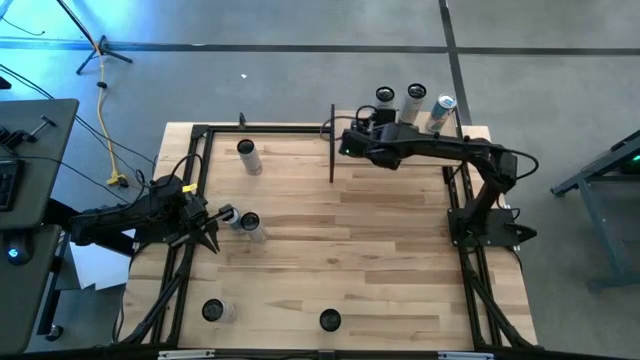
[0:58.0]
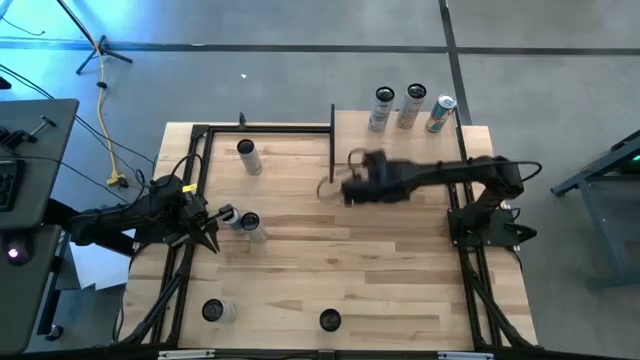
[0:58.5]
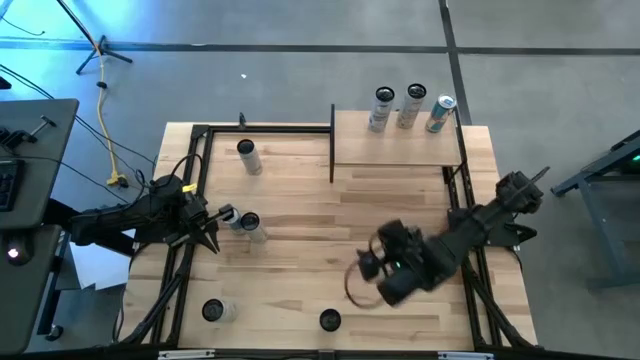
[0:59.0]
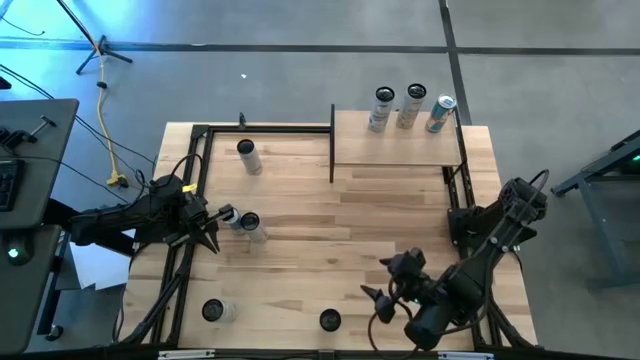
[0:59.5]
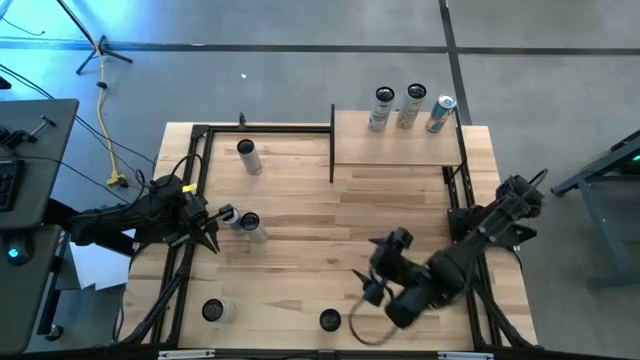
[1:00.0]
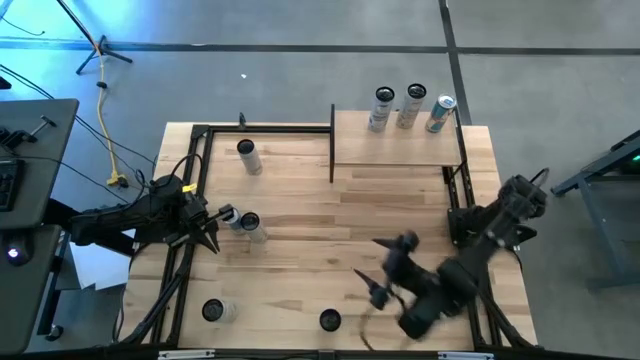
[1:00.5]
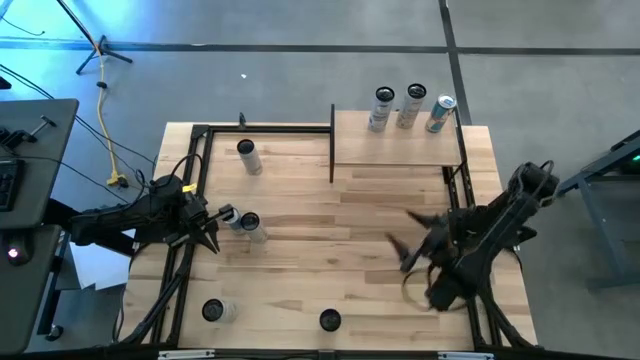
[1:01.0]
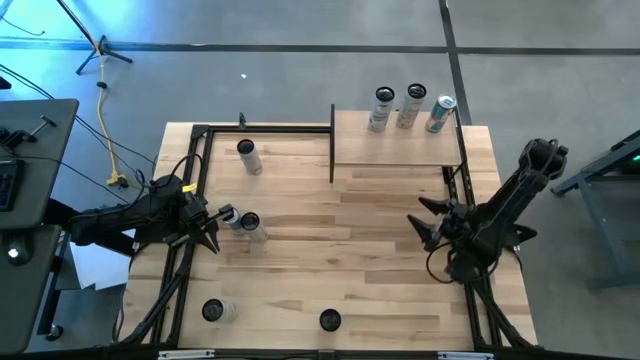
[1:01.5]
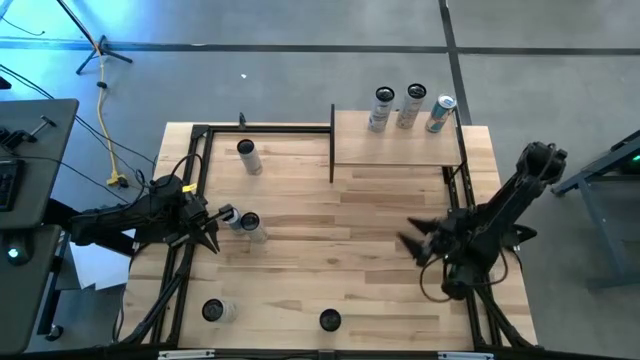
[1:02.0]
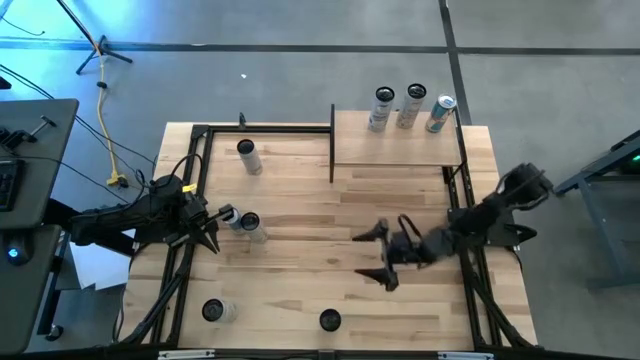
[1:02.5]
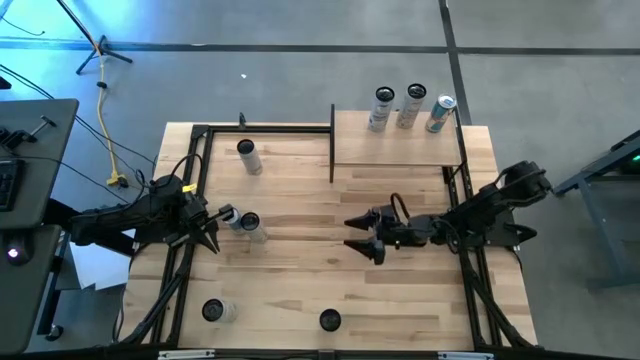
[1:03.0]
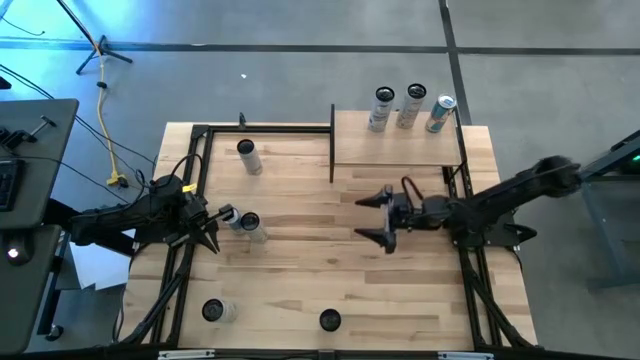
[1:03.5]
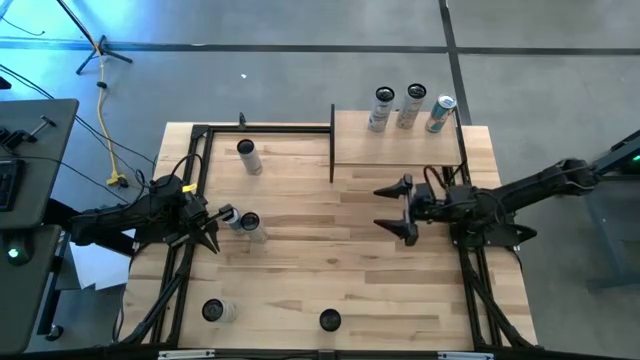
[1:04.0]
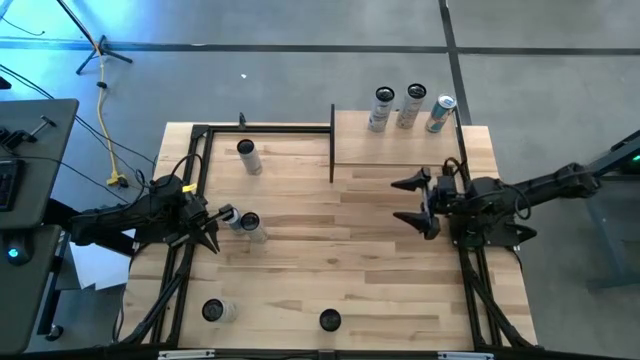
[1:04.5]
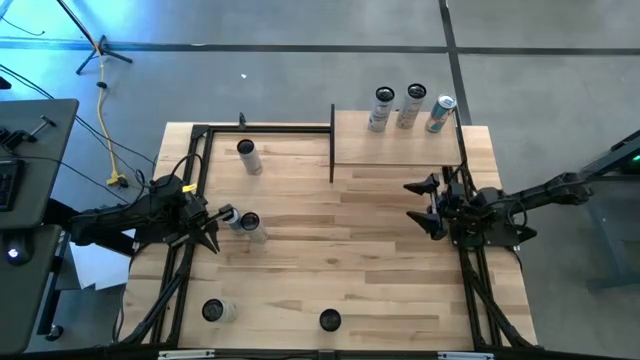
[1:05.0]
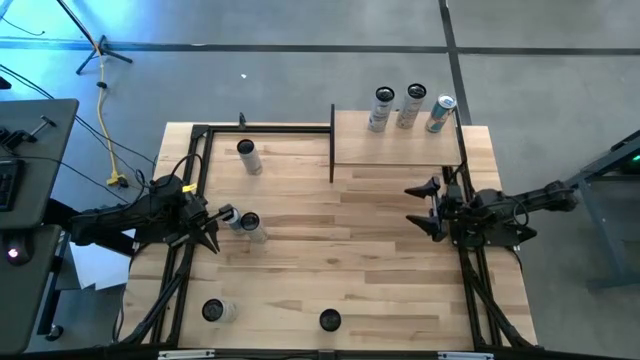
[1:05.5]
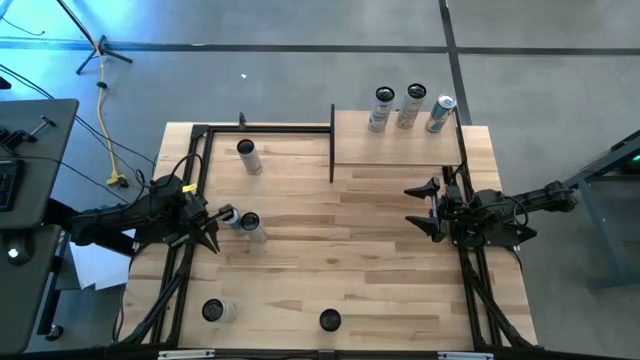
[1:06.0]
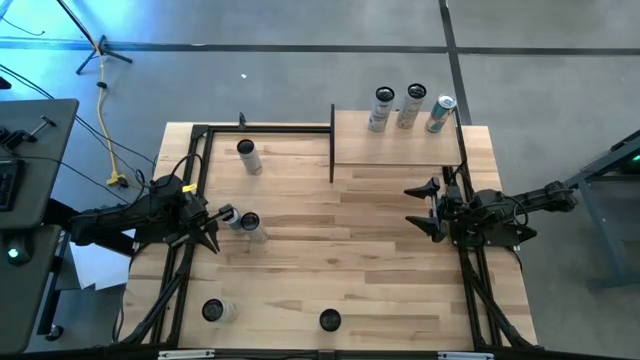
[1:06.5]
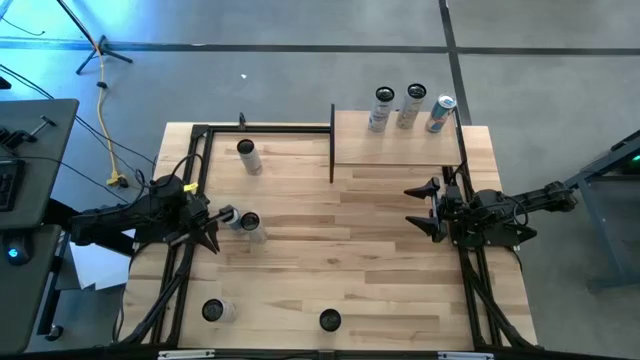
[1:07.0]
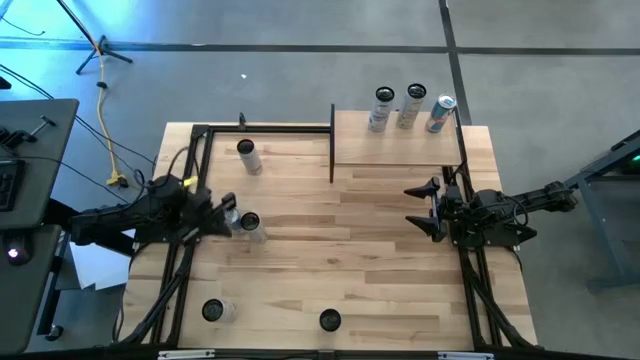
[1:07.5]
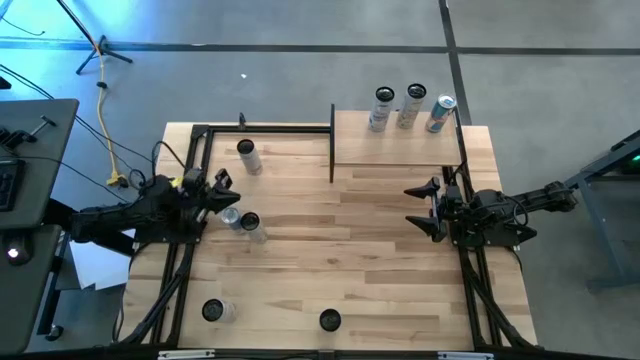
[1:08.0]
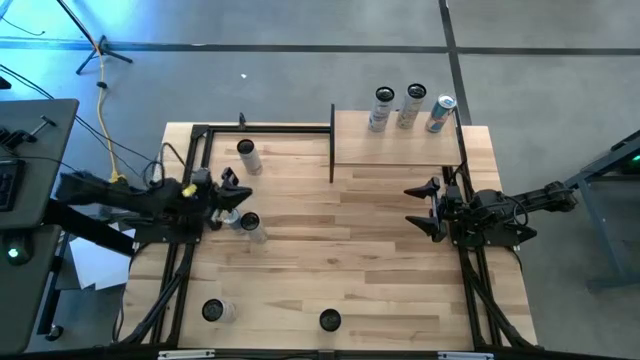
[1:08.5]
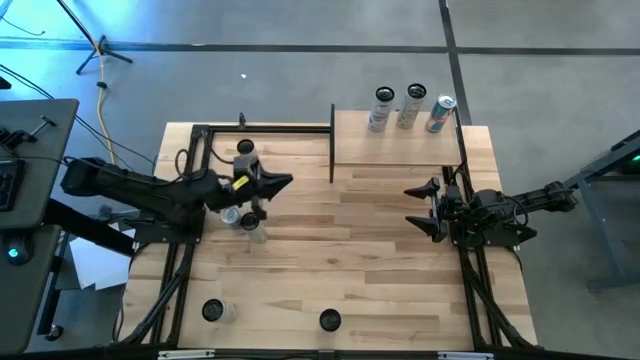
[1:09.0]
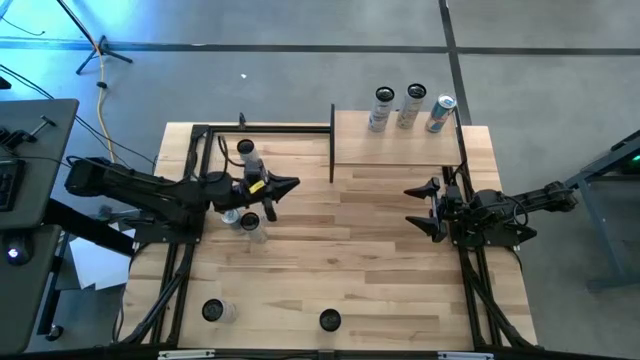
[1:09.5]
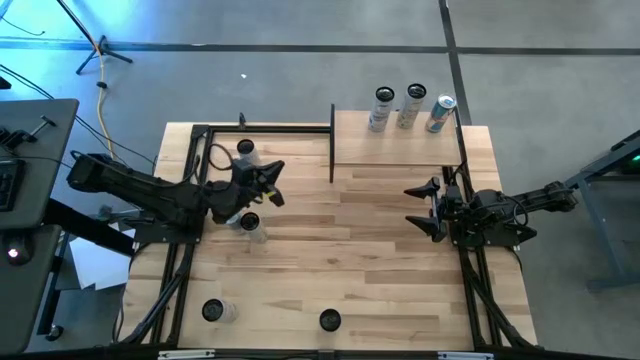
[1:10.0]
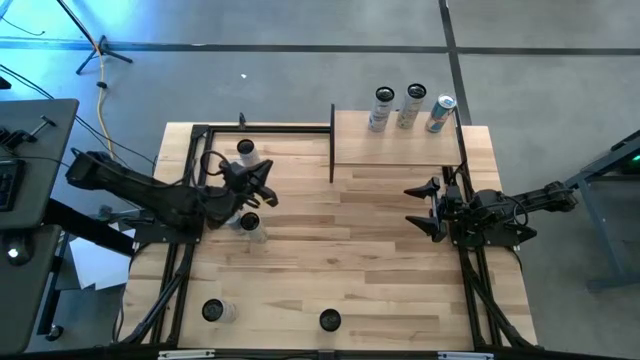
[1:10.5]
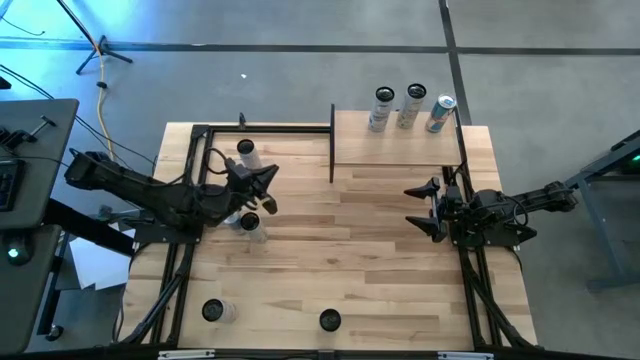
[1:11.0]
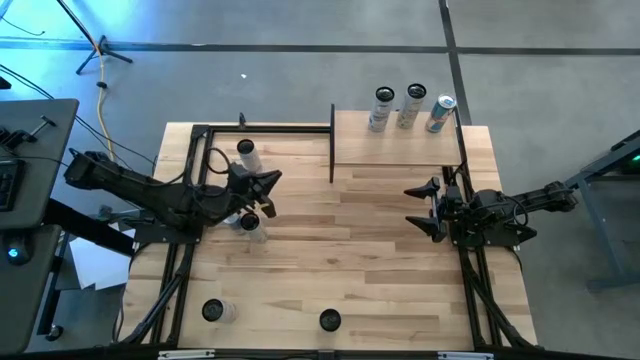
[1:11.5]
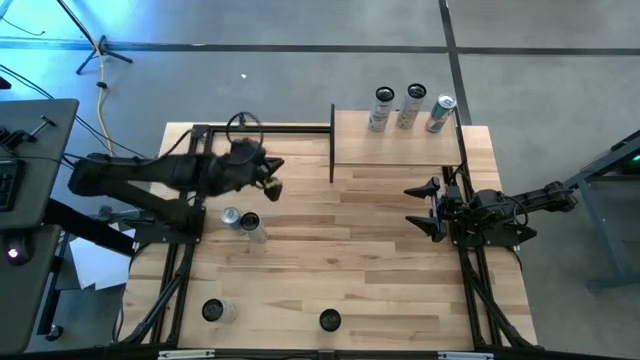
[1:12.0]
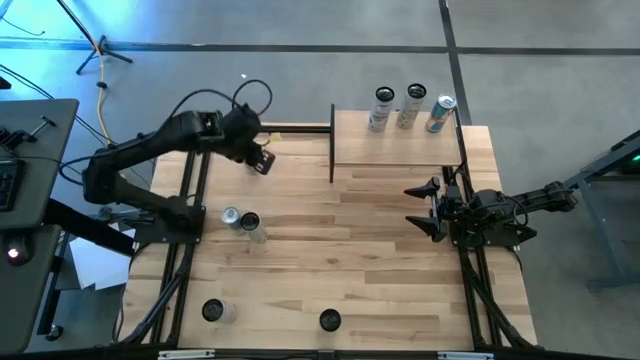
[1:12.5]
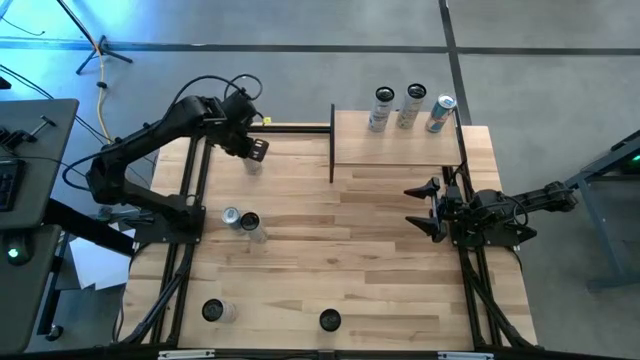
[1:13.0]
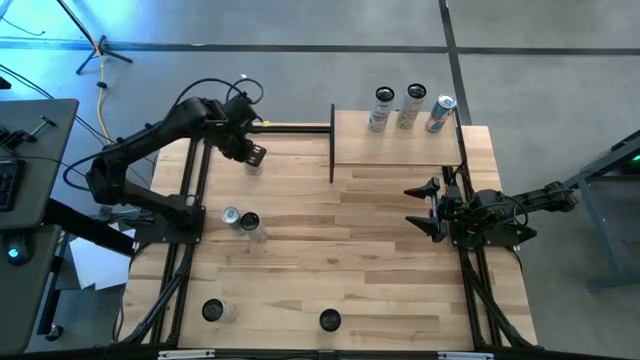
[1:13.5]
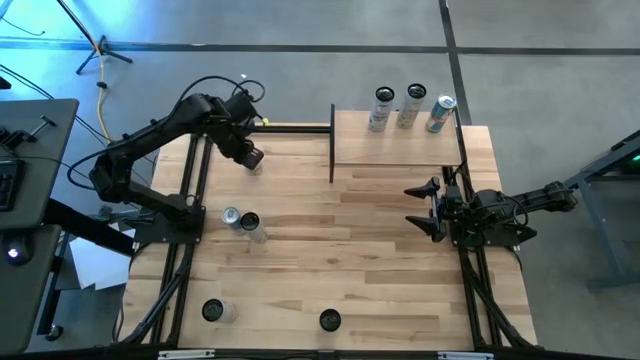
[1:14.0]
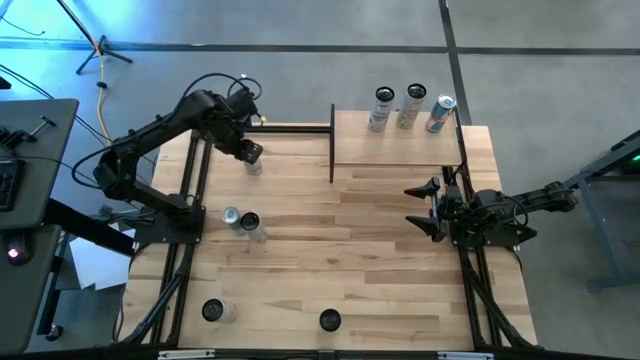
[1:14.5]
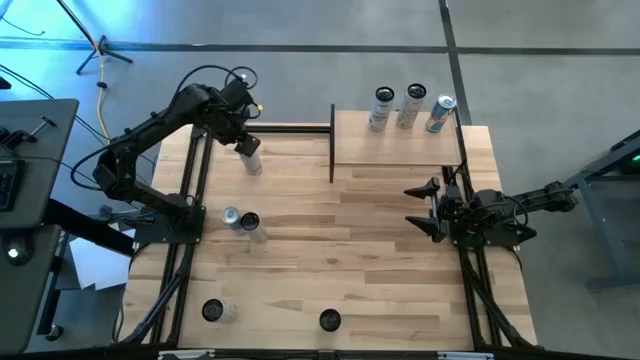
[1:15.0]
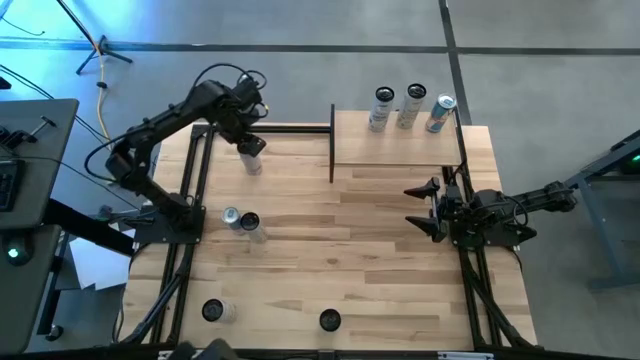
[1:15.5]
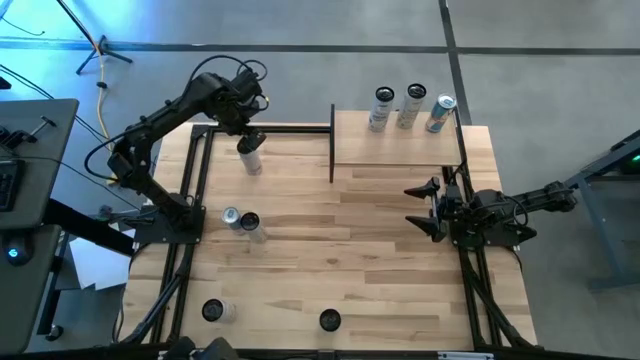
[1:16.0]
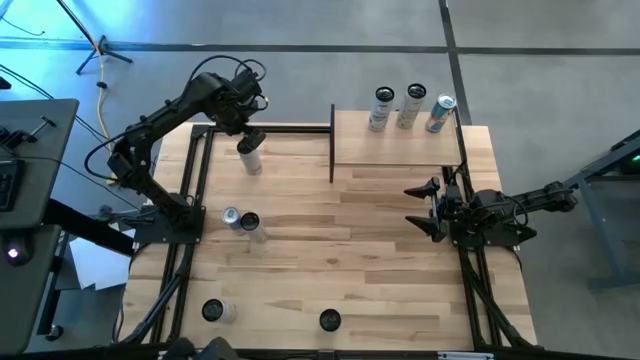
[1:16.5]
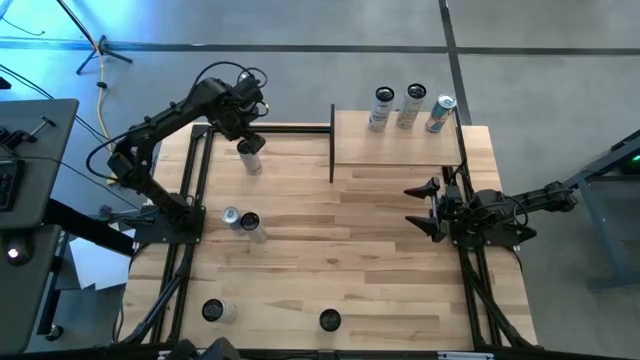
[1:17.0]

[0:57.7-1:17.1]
Task: Place canned beverage on shelf
Put the top white pink soda can on the shelf
